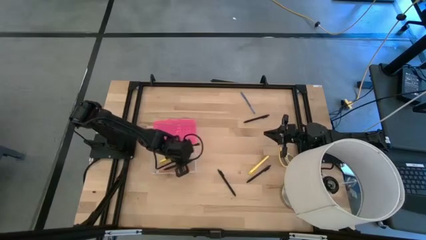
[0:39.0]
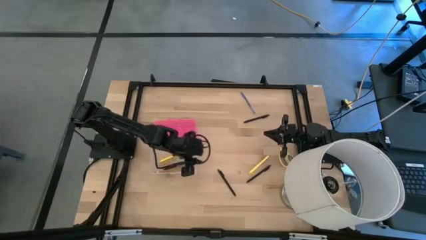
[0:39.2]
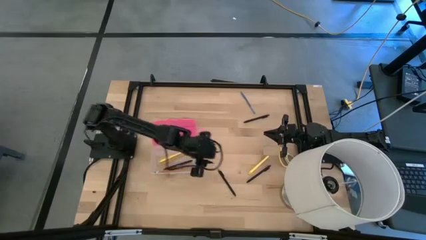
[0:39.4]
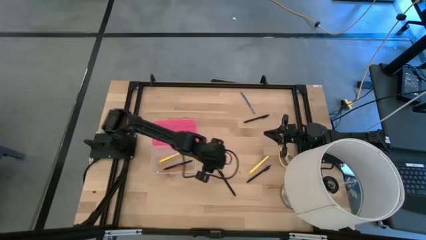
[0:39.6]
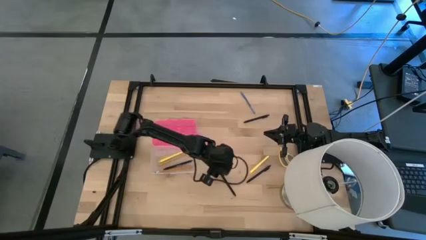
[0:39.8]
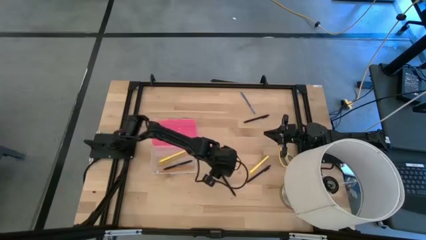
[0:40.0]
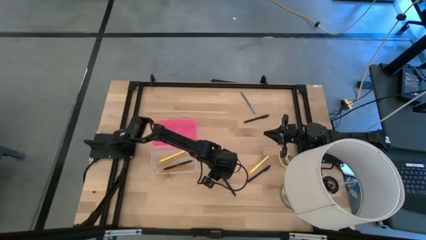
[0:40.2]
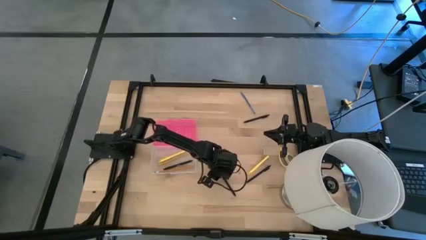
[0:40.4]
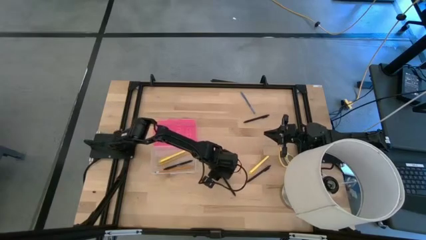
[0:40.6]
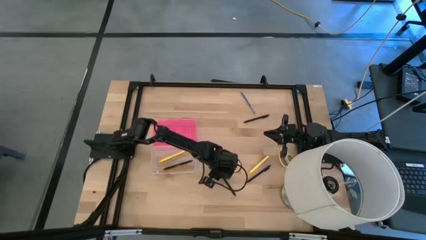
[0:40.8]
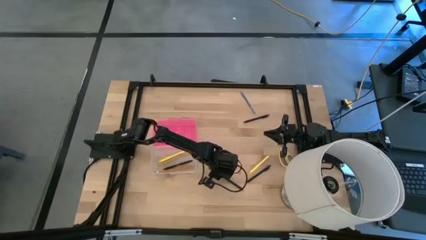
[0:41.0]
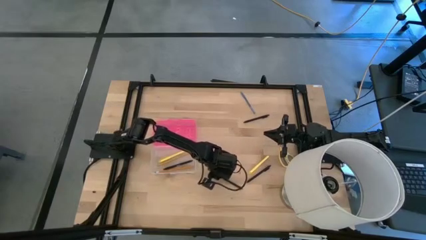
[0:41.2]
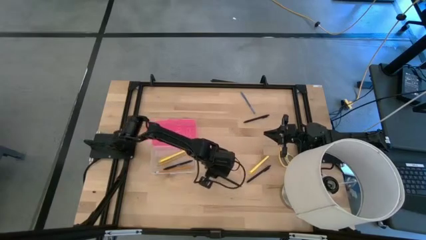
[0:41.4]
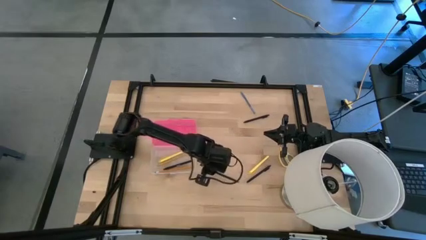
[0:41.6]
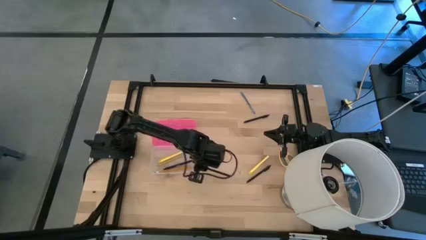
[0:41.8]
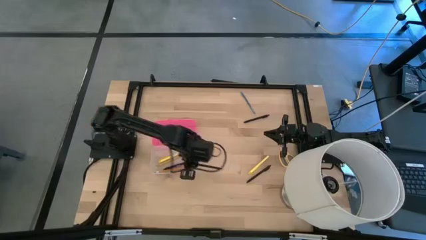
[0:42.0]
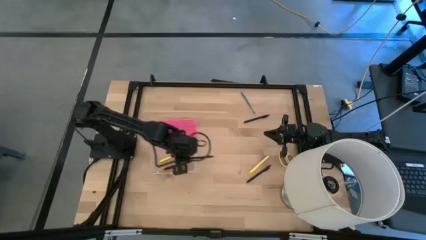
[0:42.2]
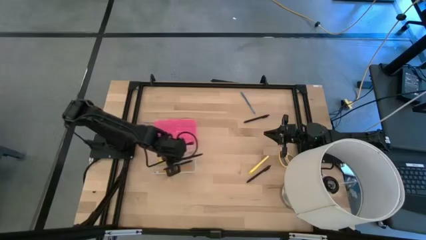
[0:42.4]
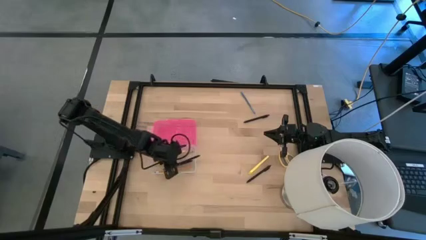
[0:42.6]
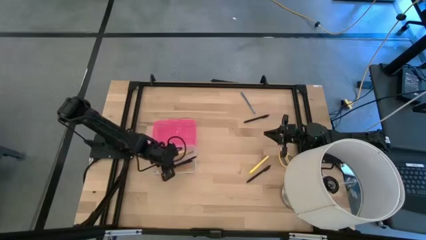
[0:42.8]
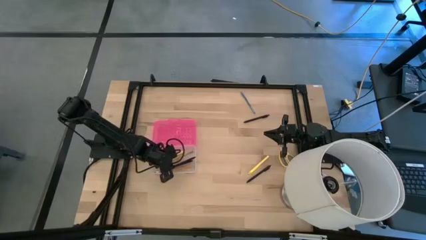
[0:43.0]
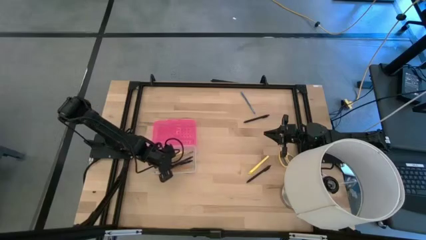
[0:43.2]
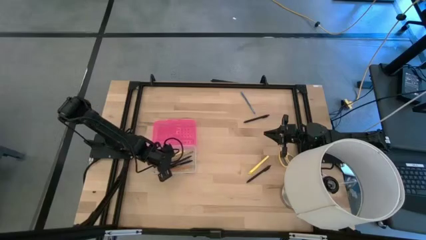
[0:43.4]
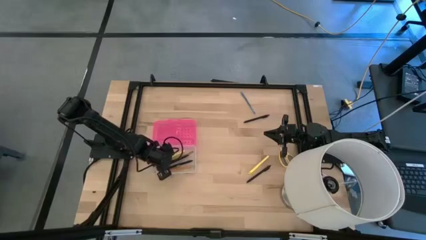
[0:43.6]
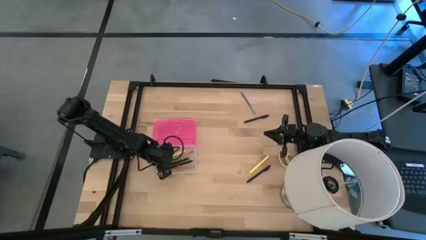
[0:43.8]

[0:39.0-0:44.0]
Task: Pick & place school supplies into a supply box
Put the bottom left black pen into the pink supply box

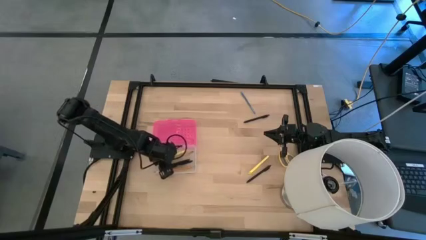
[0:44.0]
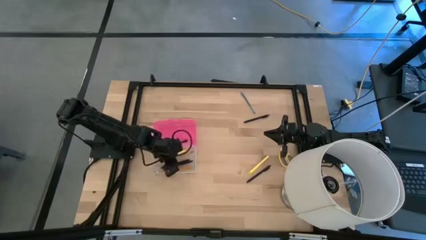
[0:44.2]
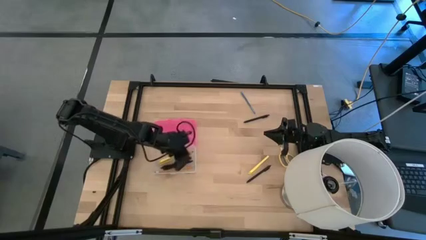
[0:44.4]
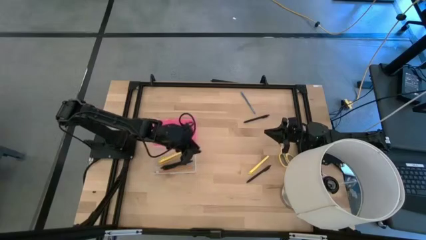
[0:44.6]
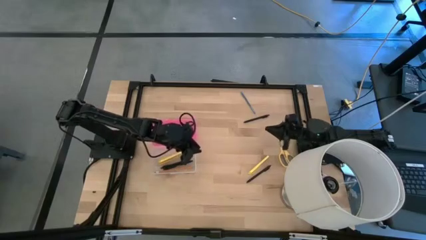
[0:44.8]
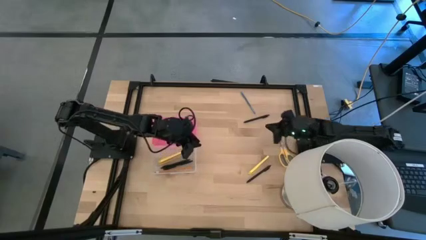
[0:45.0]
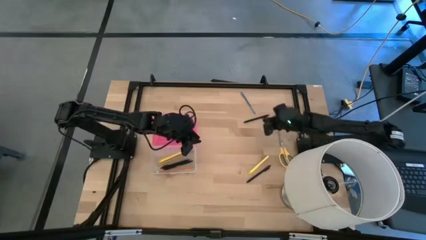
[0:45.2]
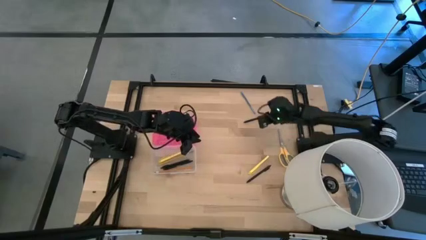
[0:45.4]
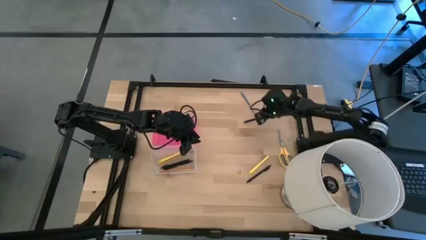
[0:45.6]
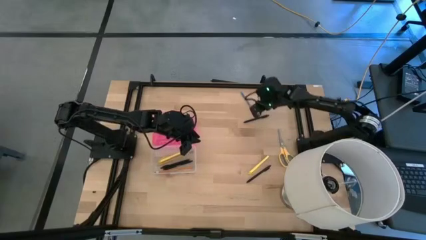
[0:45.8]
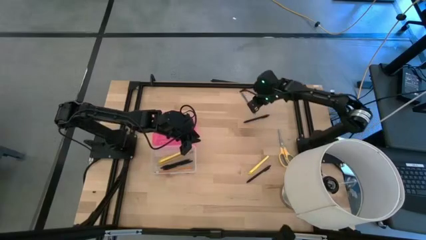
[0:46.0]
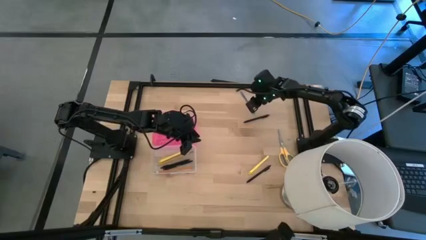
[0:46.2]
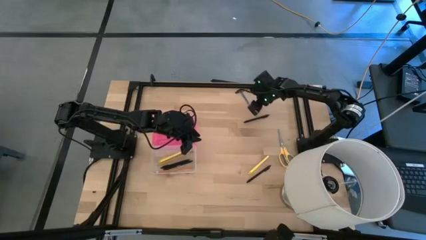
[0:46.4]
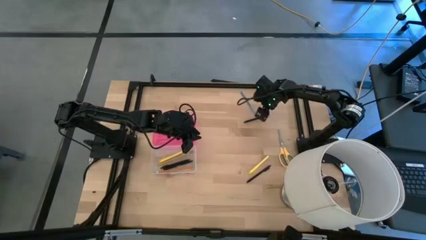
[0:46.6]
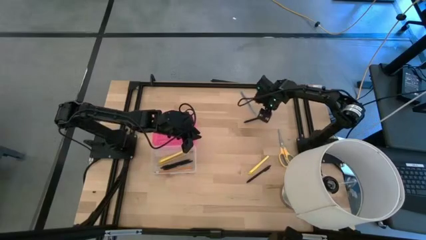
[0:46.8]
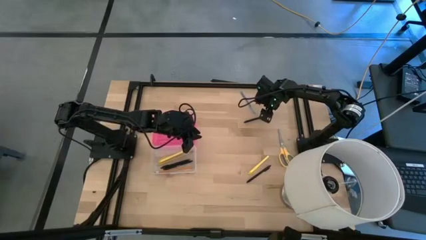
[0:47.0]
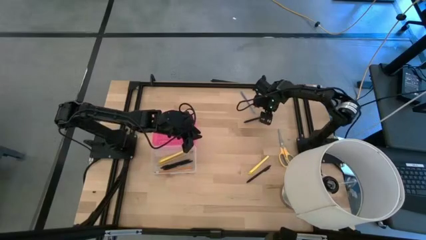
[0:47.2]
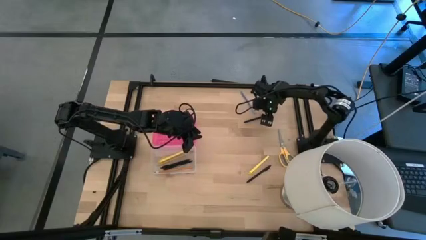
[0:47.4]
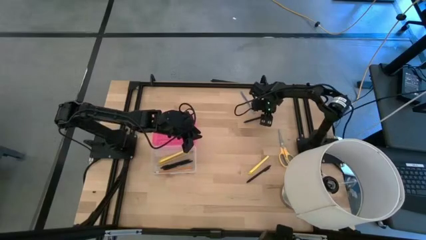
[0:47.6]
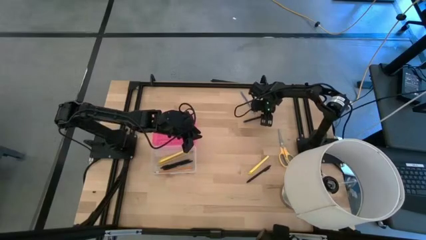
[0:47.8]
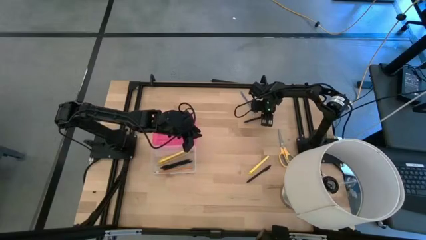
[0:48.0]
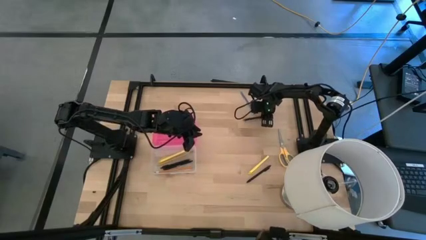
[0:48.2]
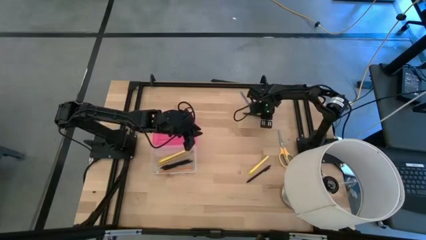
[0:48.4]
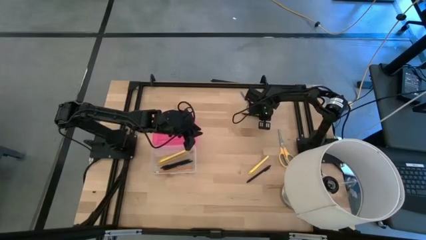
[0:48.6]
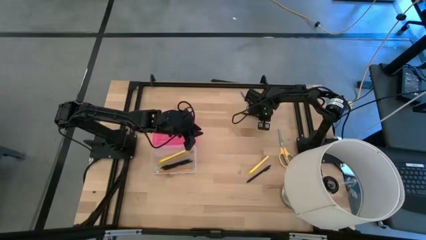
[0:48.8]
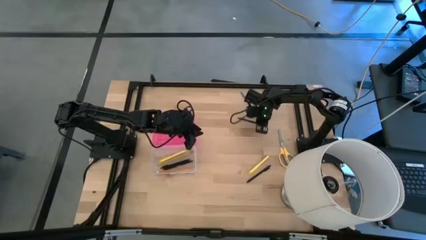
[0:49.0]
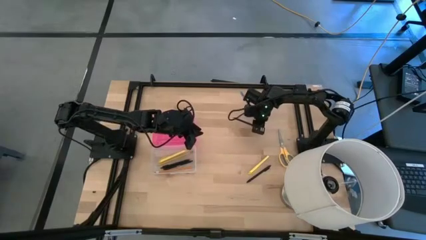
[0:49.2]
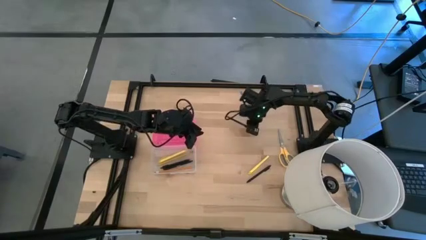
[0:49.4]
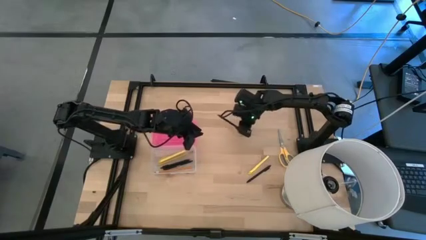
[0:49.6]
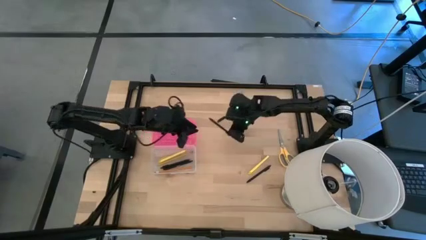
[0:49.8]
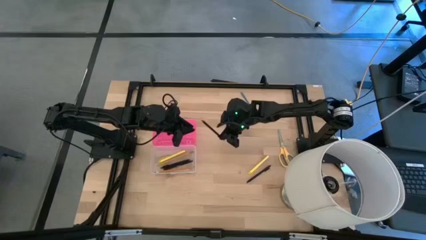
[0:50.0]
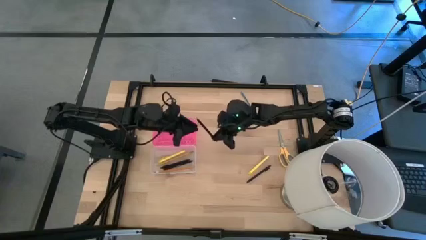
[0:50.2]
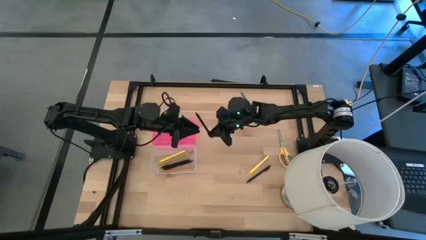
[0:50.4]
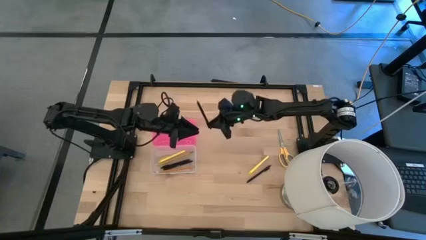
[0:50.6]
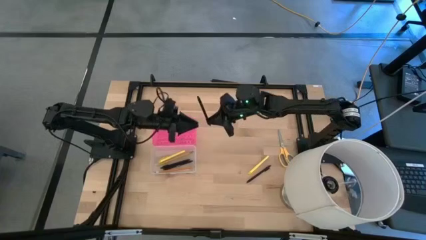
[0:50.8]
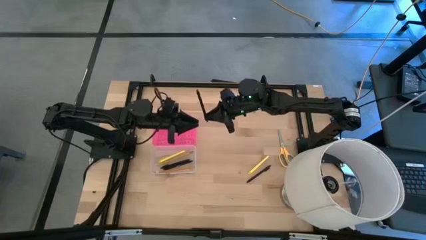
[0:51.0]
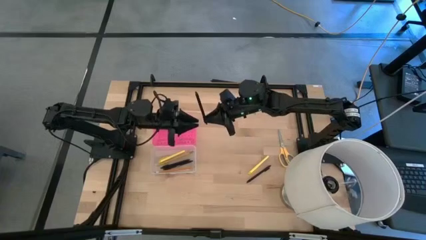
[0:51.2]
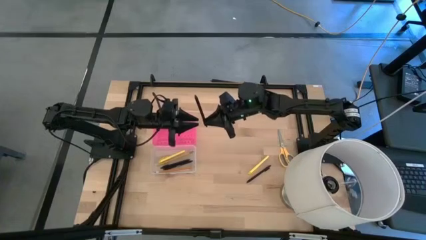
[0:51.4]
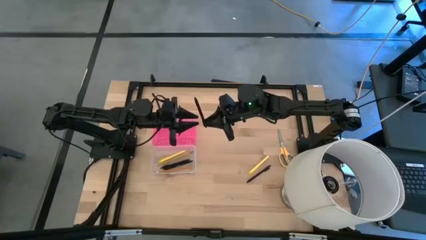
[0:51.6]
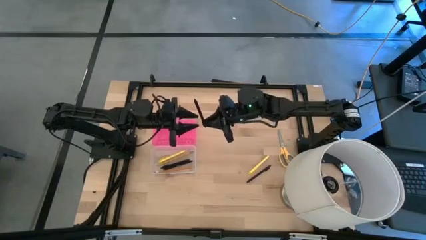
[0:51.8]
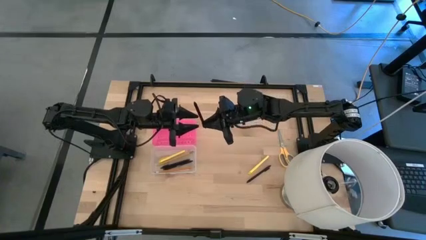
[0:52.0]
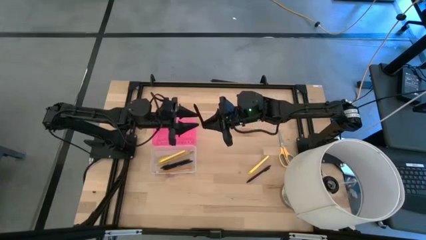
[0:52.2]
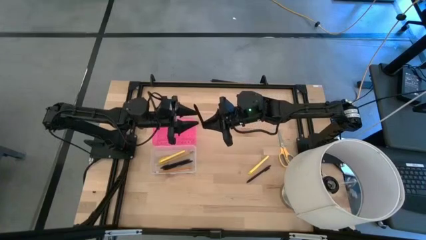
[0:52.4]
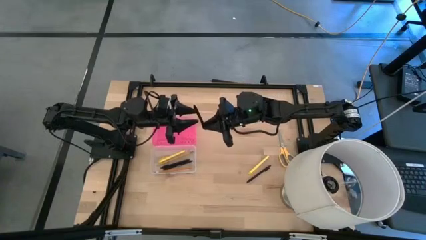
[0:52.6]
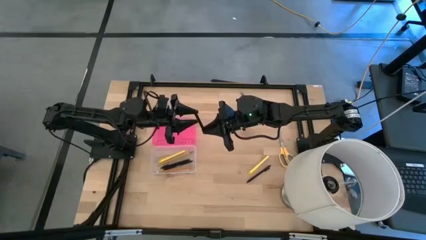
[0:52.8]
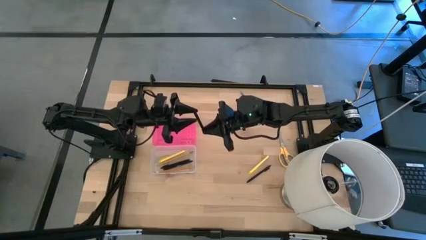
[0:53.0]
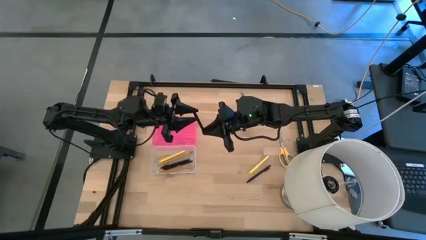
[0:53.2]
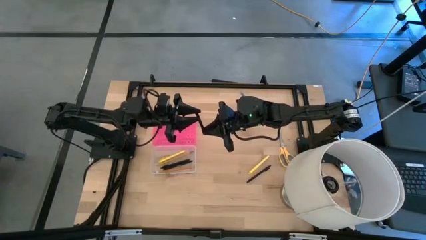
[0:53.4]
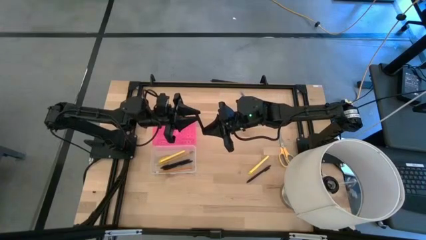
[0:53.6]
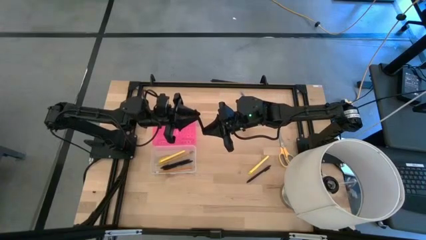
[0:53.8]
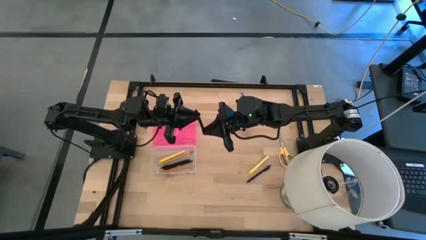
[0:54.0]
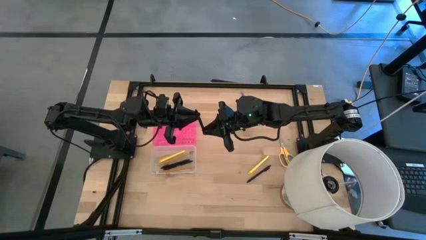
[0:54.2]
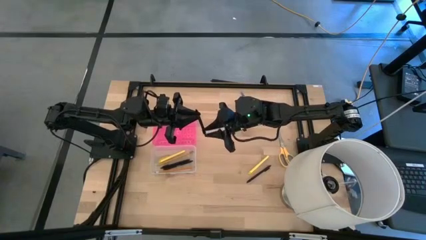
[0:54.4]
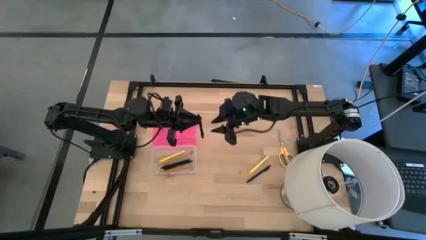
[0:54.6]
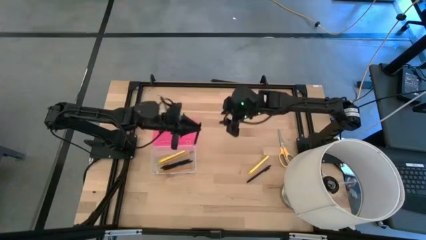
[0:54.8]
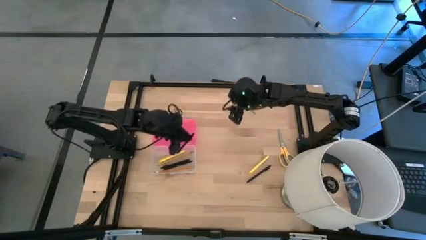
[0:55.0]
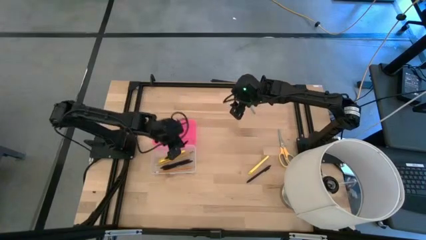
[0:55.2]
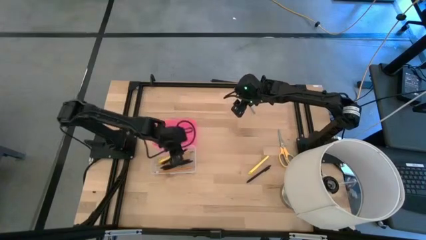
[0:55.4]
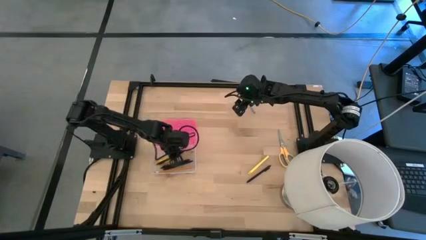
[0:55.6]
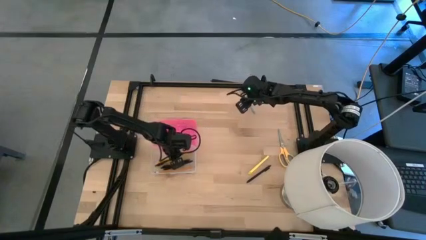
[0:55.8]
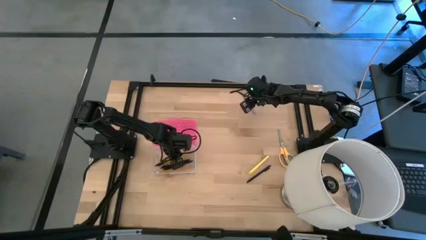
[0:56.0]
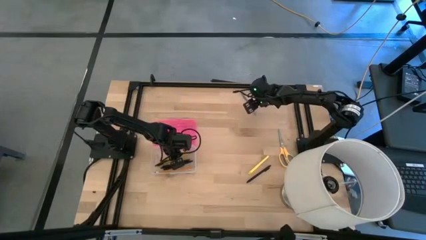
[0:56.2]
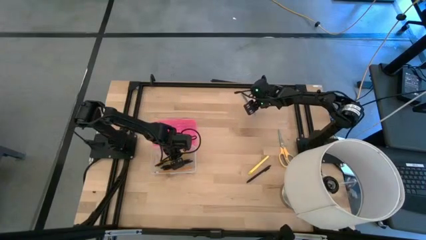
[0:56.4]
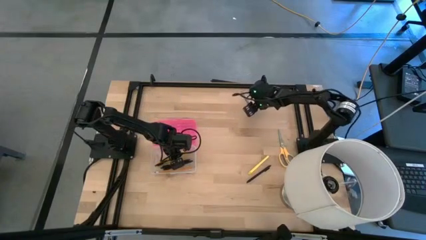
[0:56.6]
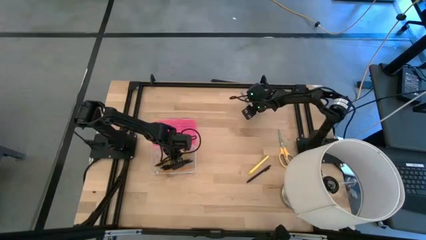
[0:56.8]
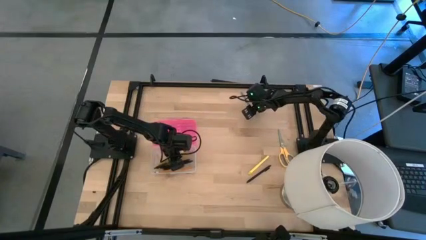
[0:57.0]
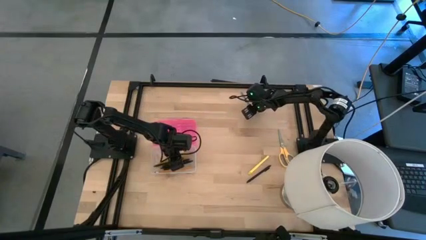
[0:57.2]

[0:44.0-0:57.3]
Put the top black pen into the pink supply box
